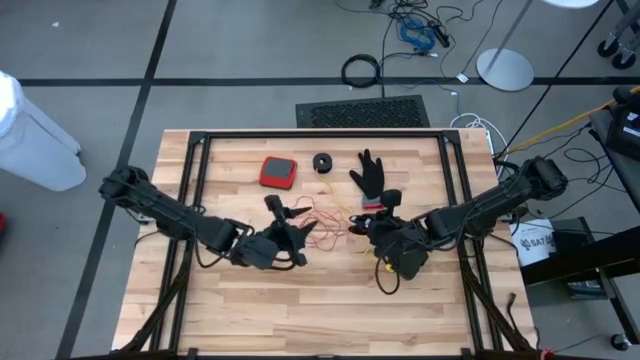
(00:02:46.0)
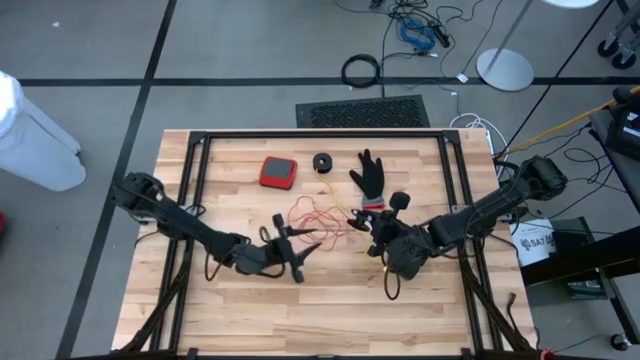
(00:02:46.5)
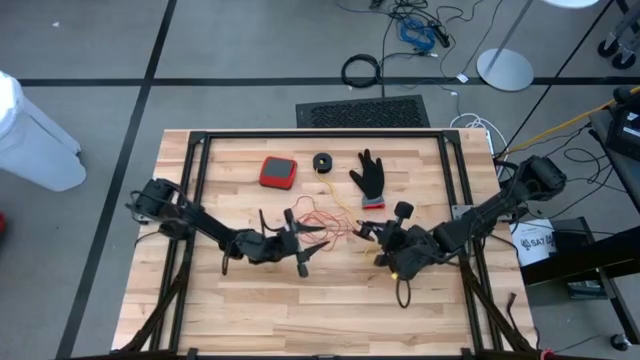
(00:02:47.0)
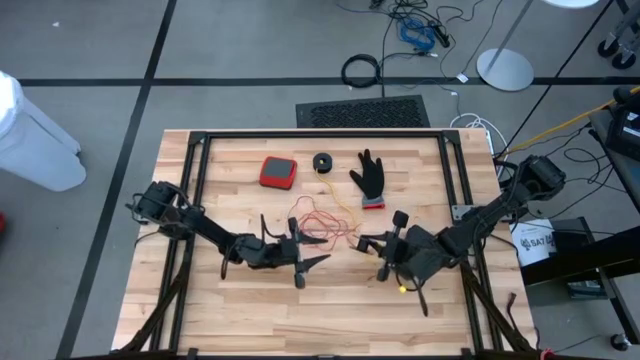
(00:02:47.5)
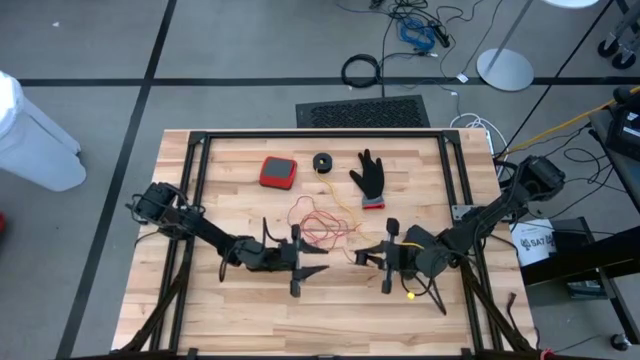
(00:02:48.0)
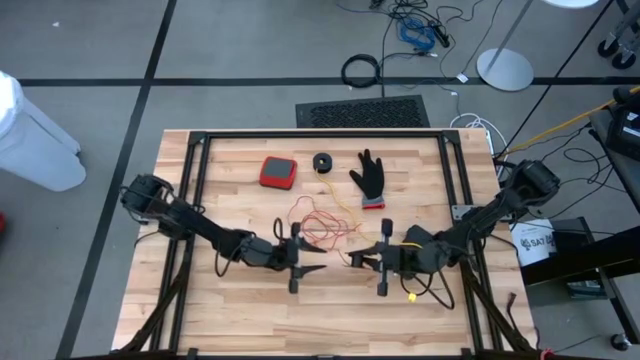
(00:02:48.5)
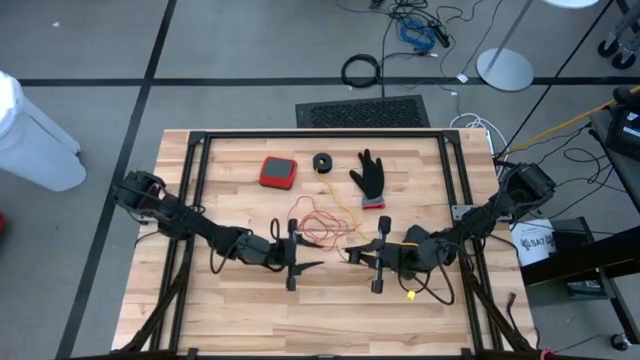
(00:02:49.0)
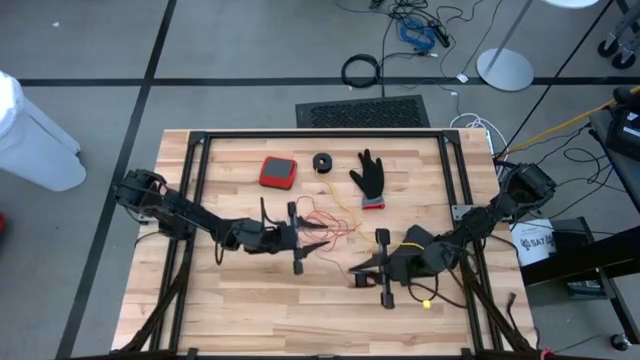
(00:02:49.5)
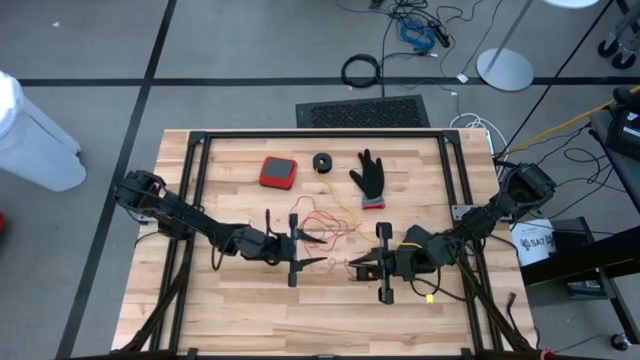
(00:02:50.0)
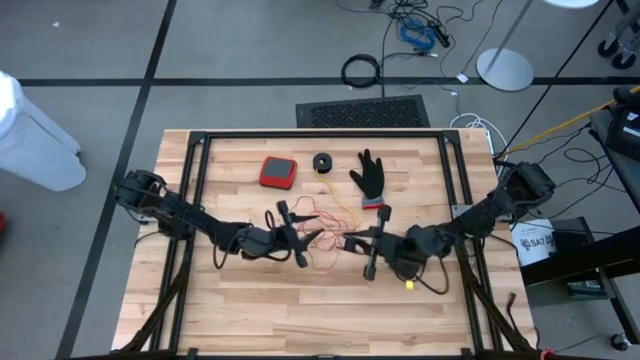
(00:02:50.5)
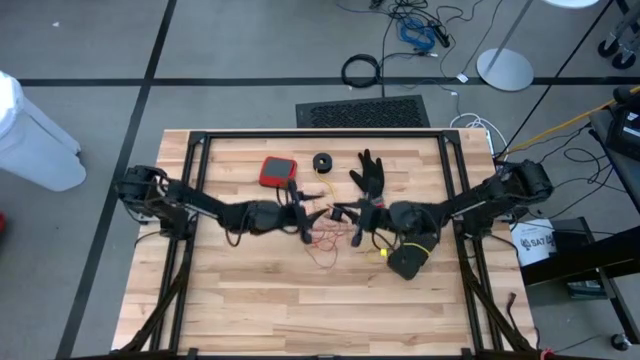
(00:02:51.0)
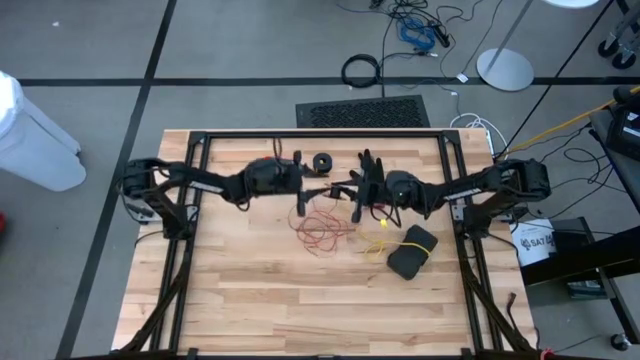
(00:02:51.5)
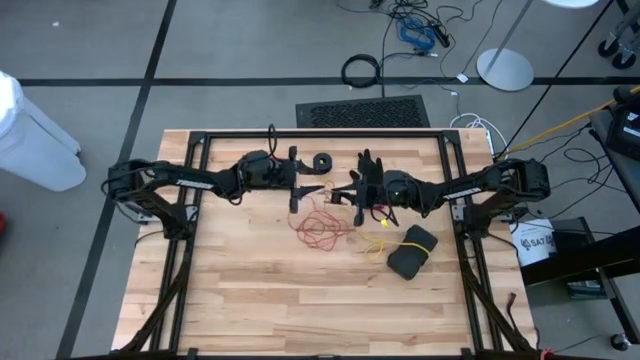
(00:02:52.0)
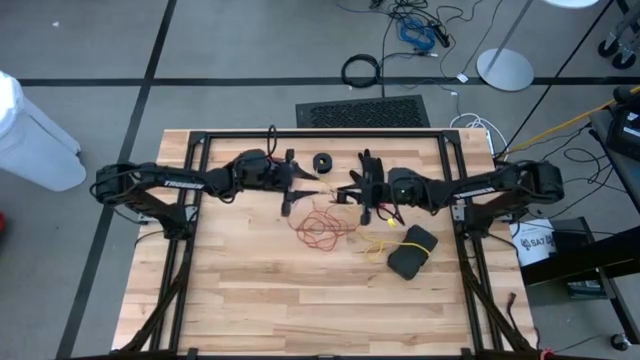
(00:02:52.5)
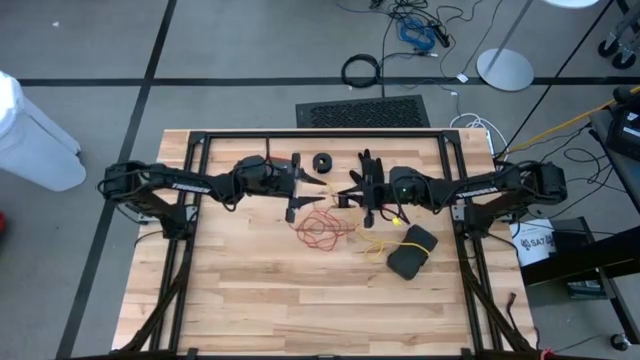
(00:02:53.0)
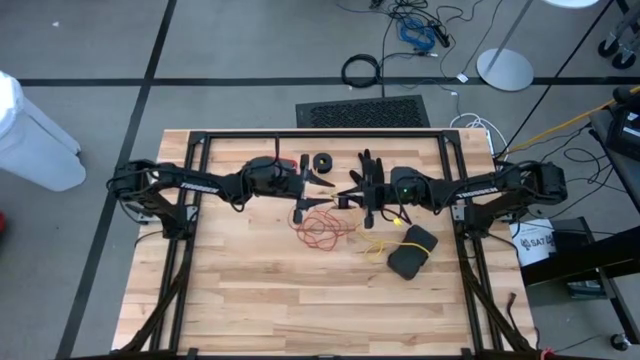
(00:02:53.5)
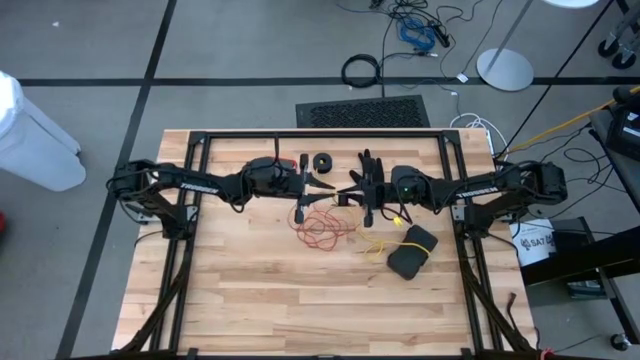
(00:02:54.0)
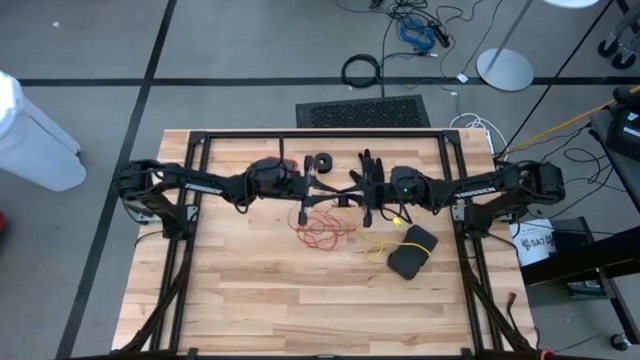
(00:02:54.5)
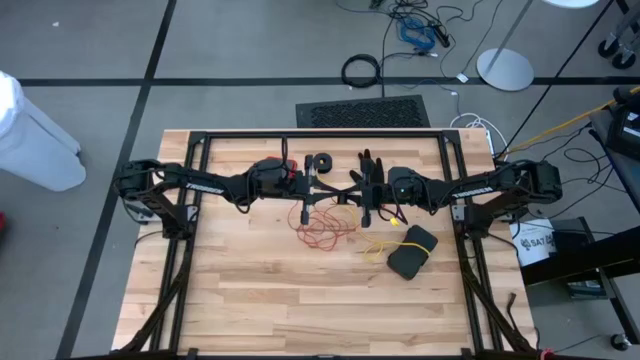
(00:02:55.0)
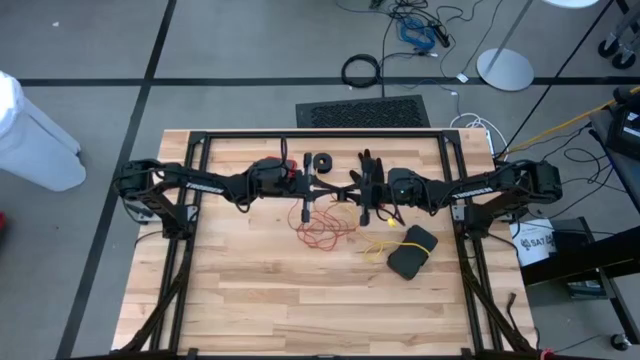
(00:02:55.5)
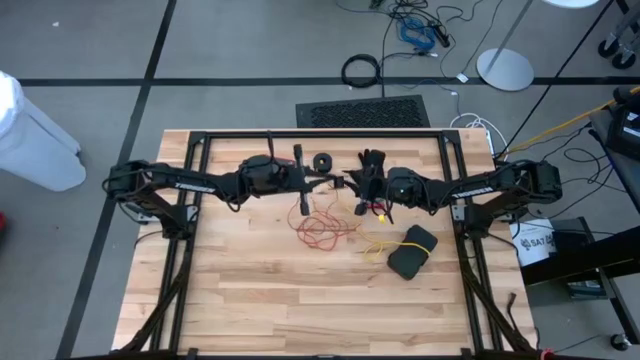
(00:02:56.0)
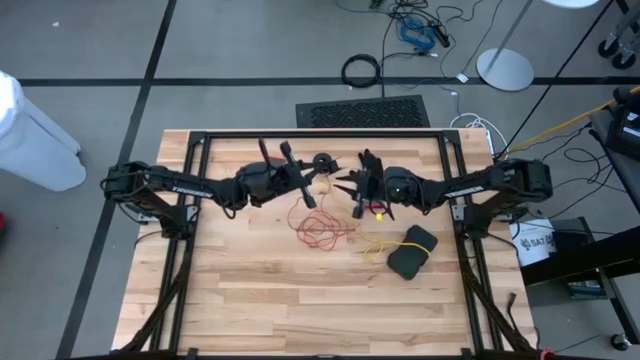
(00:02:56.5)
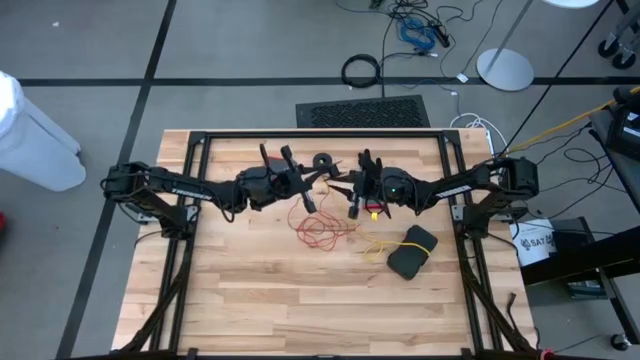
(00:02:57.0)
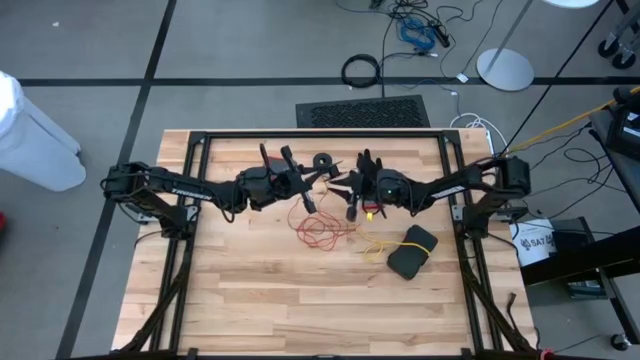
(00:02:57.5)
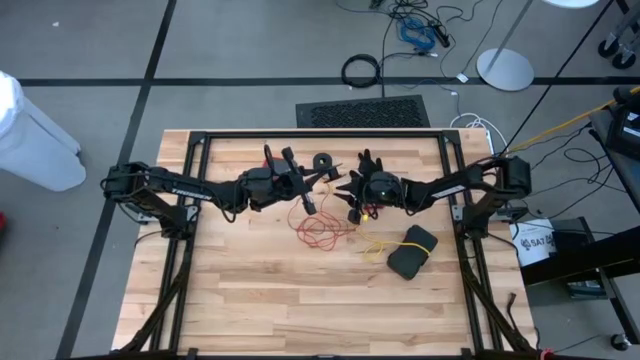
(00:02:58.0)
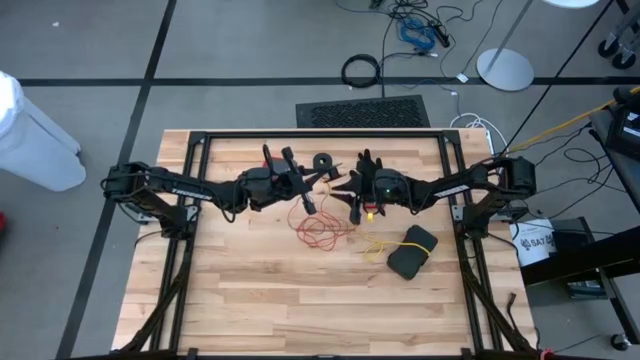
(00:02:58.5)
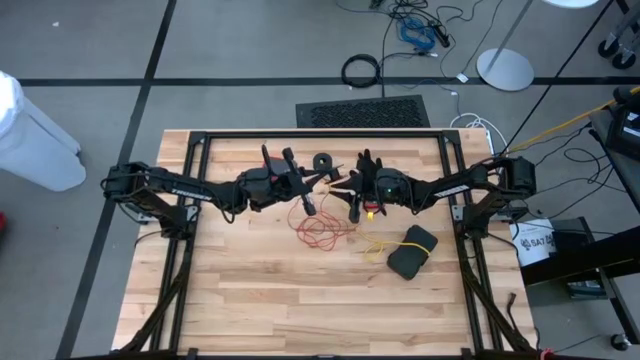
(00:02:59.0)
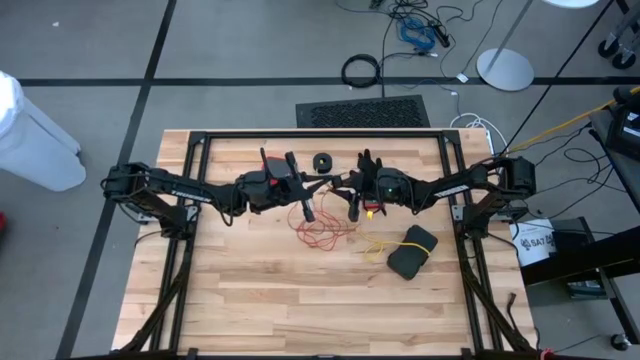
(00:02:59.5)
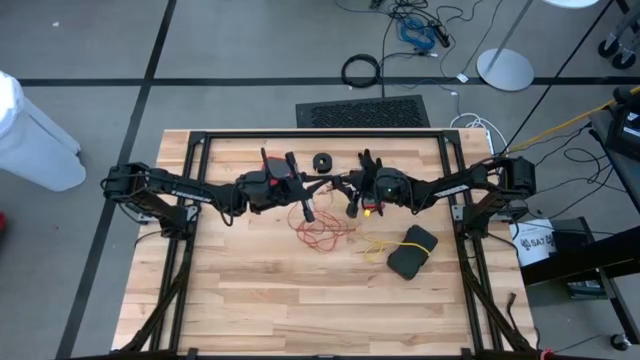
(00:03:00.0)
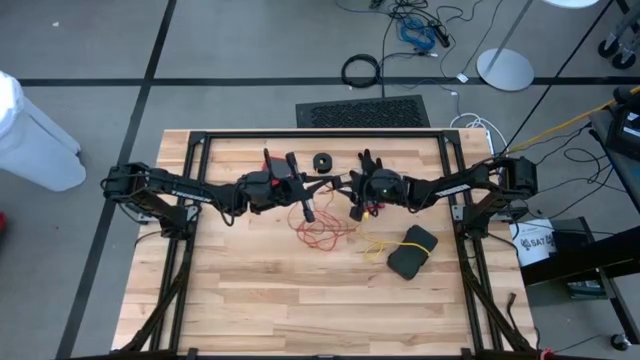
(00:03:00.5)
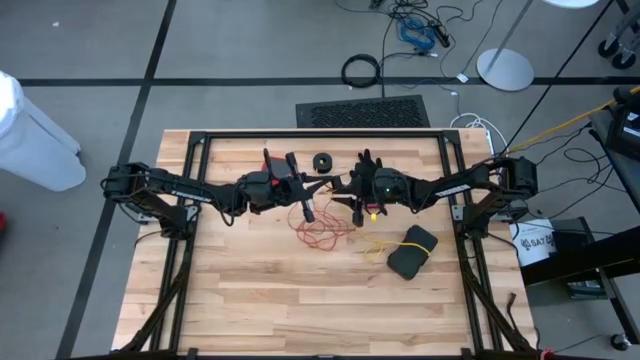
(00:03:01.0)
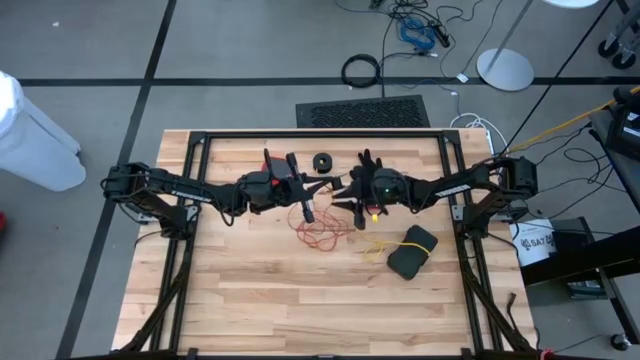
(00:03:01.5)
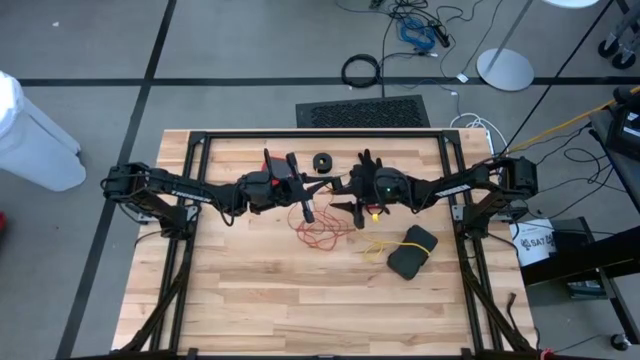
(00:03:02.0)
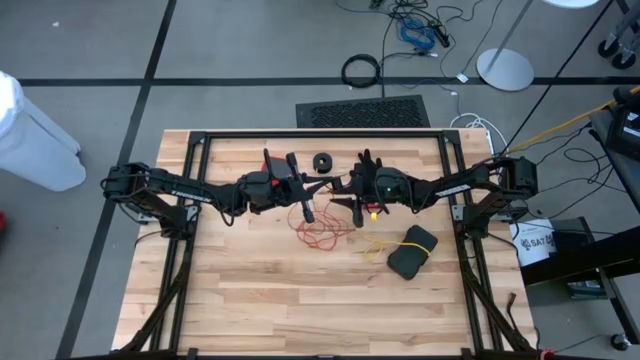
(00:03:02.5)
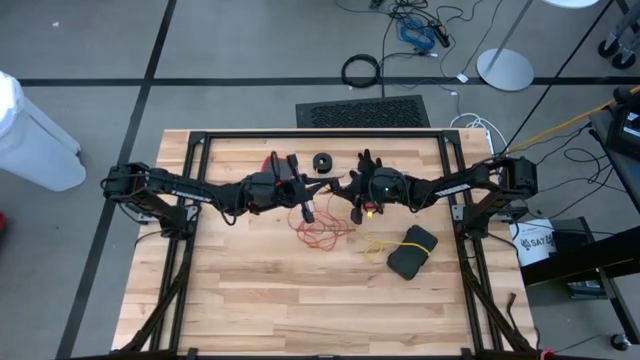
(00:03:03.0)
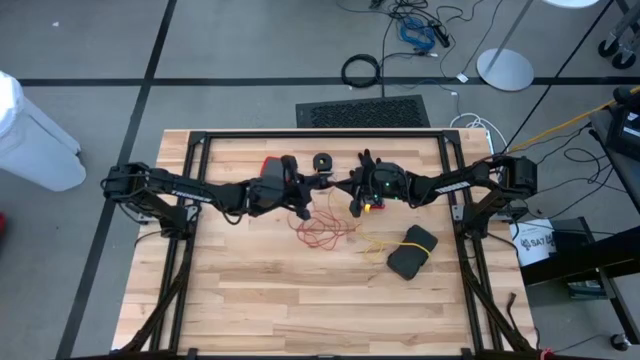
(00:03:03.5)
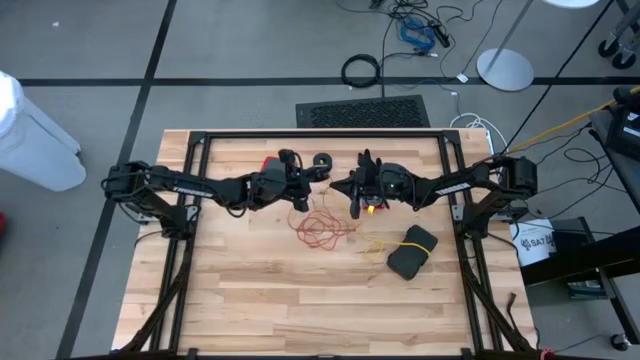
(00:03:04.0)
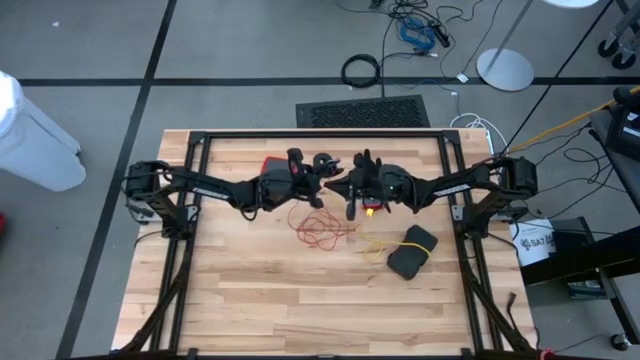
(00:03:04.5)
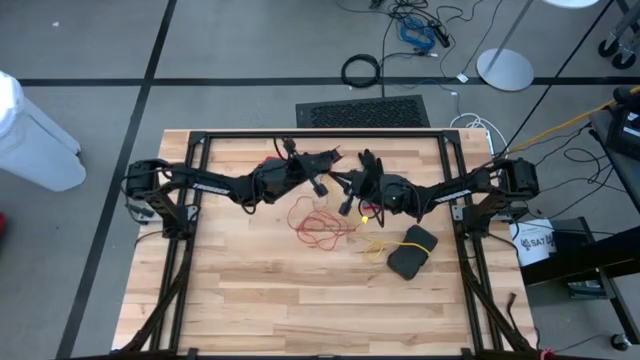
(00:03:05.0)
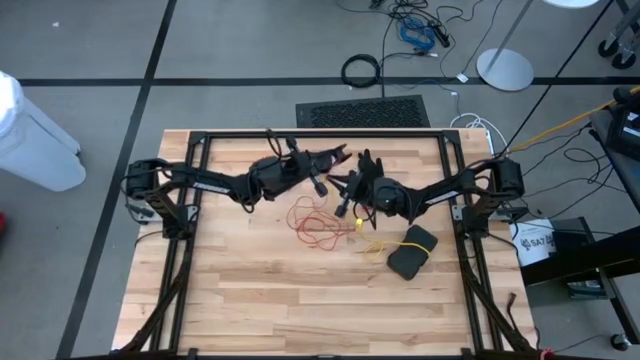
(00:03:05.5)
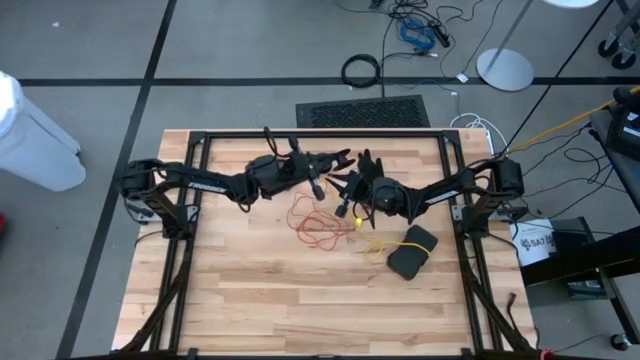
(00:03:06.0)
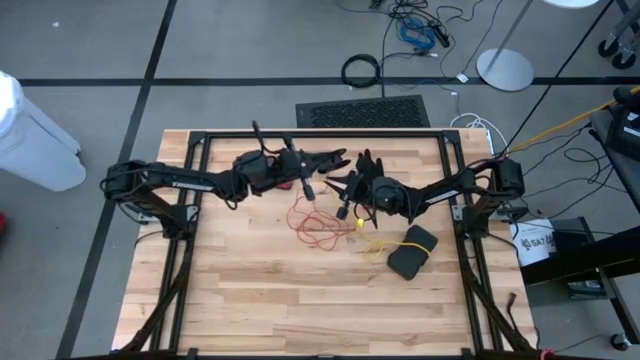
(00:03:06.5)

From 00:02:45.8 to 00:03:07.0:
Task: Coil cords
Coil the red wire onto spool
